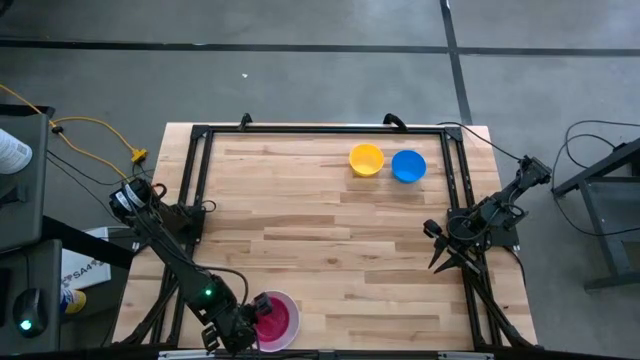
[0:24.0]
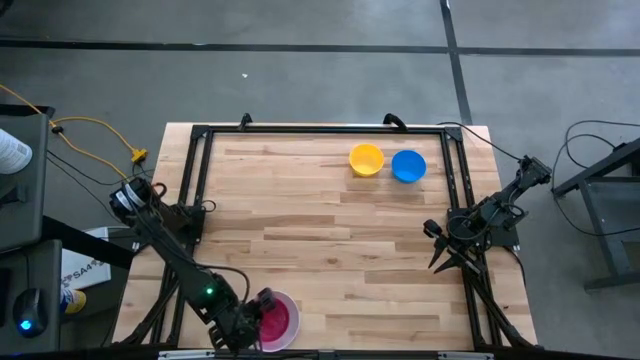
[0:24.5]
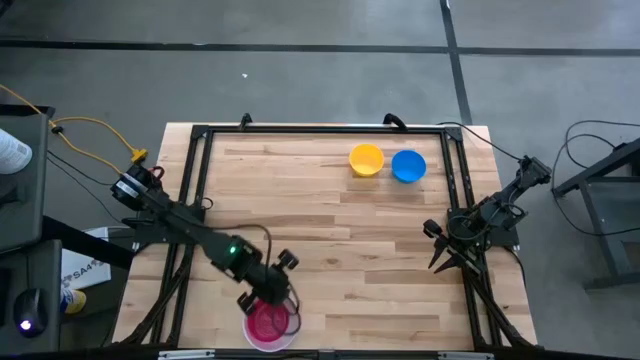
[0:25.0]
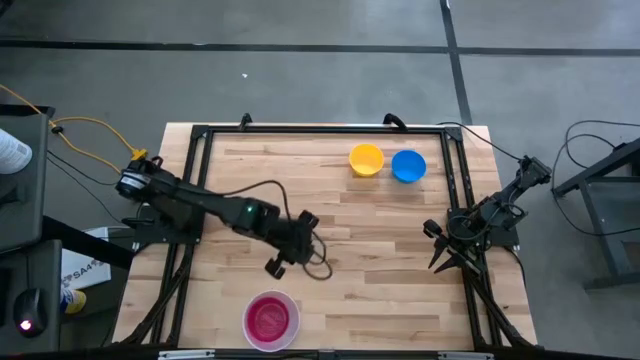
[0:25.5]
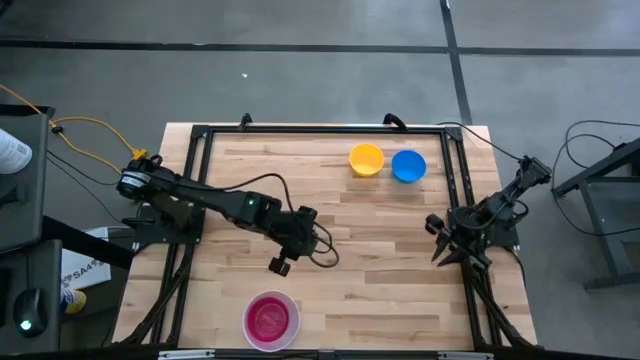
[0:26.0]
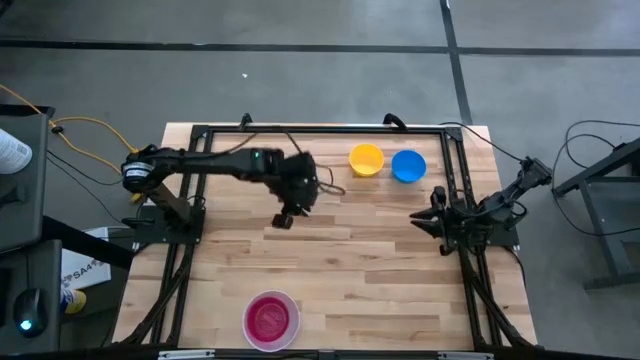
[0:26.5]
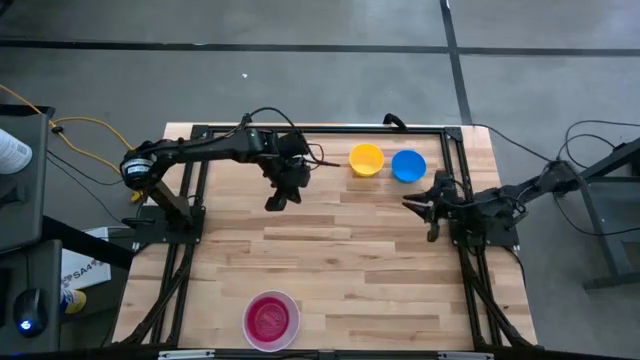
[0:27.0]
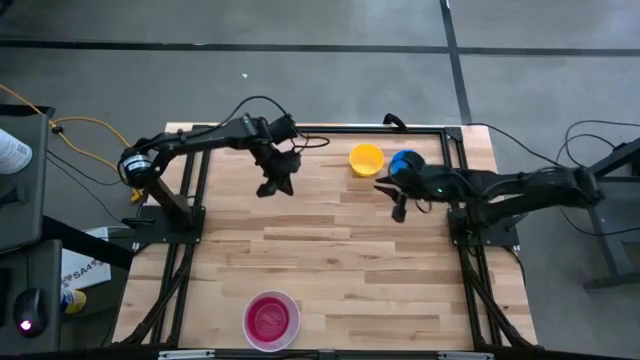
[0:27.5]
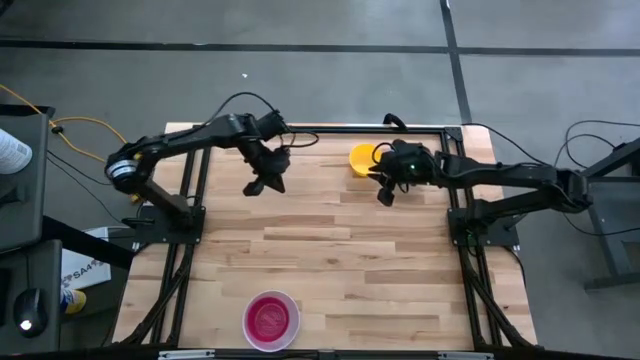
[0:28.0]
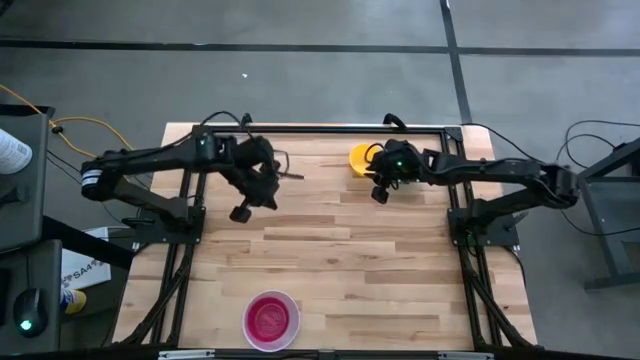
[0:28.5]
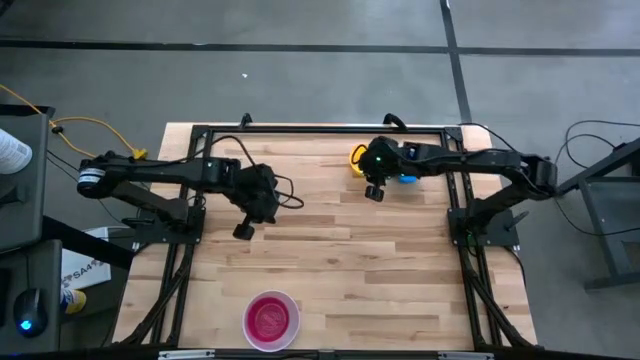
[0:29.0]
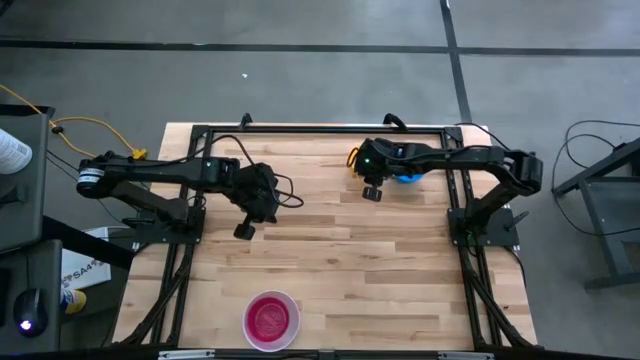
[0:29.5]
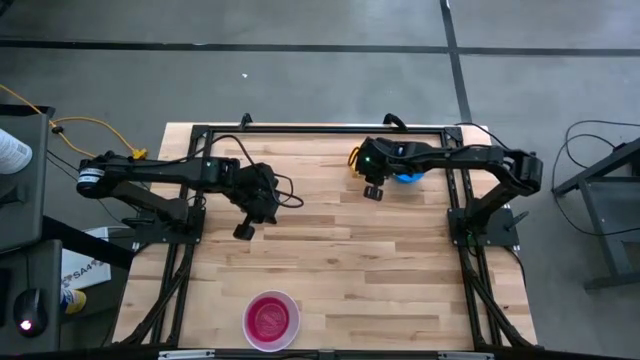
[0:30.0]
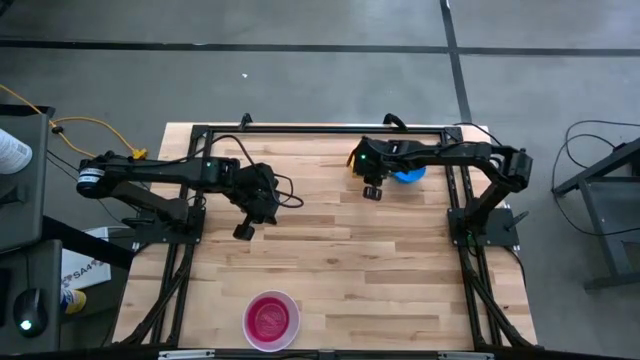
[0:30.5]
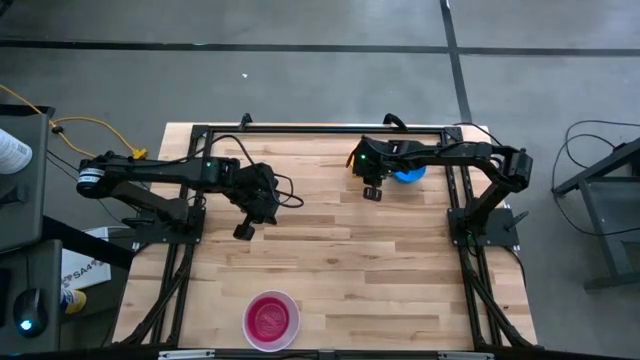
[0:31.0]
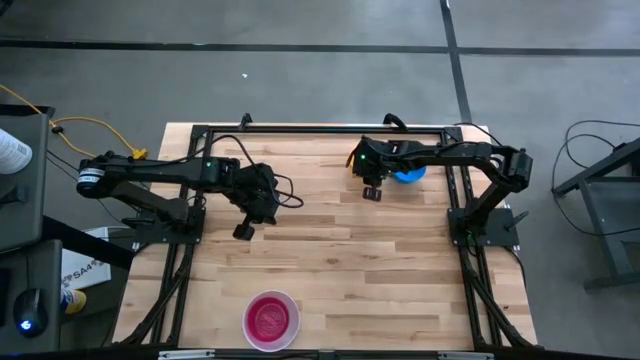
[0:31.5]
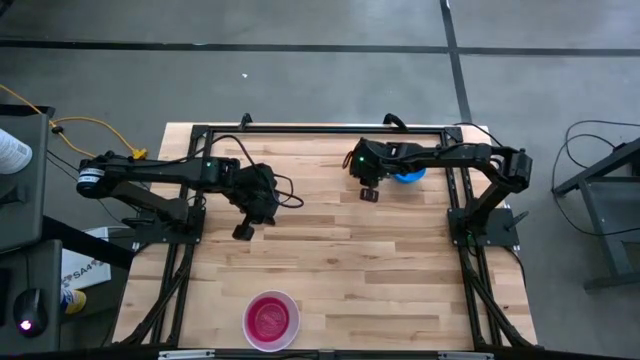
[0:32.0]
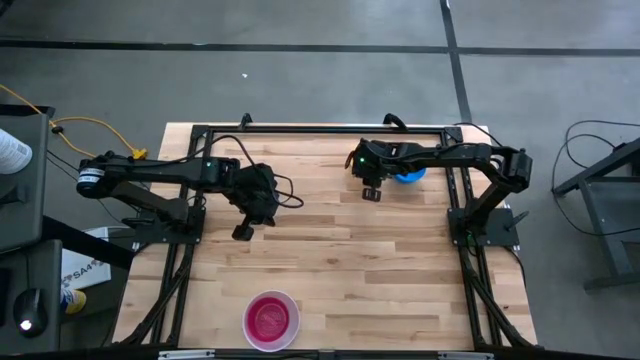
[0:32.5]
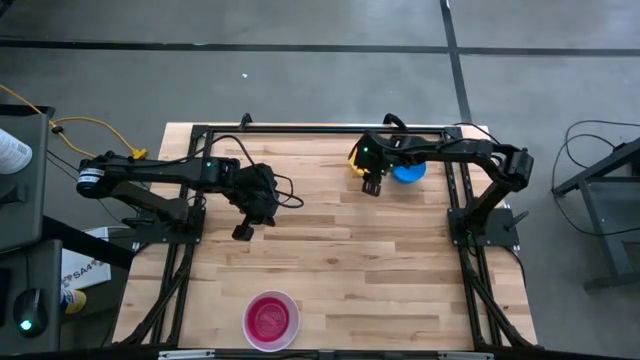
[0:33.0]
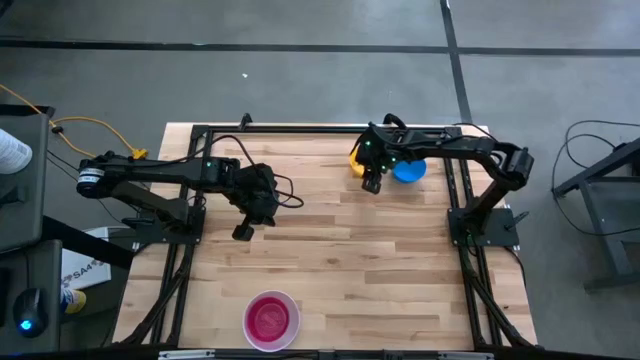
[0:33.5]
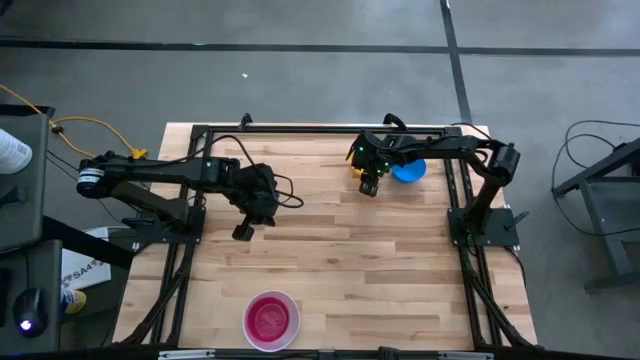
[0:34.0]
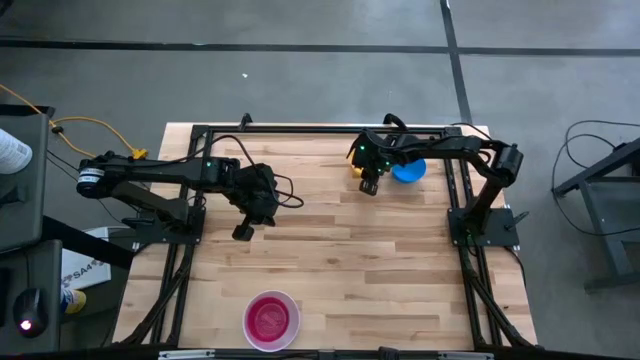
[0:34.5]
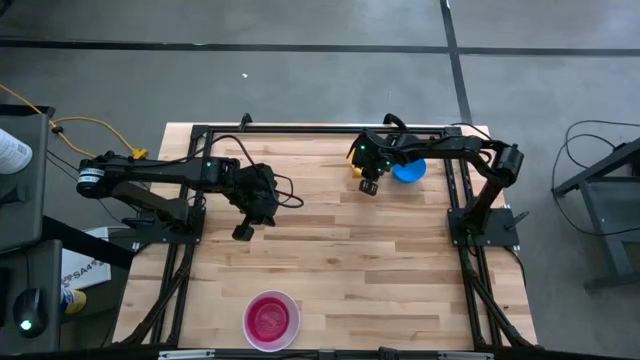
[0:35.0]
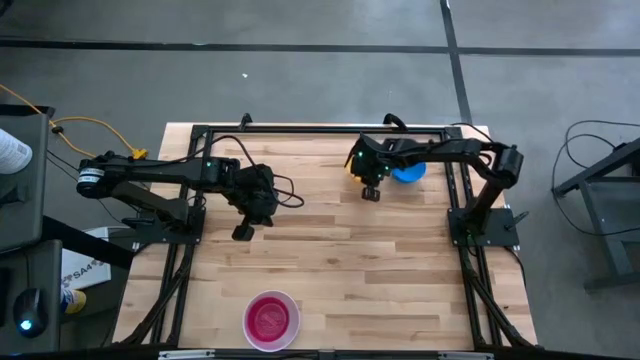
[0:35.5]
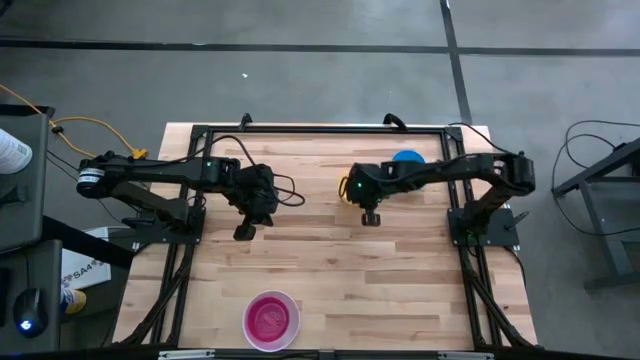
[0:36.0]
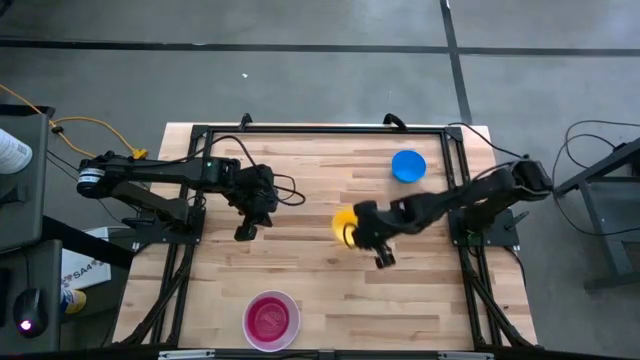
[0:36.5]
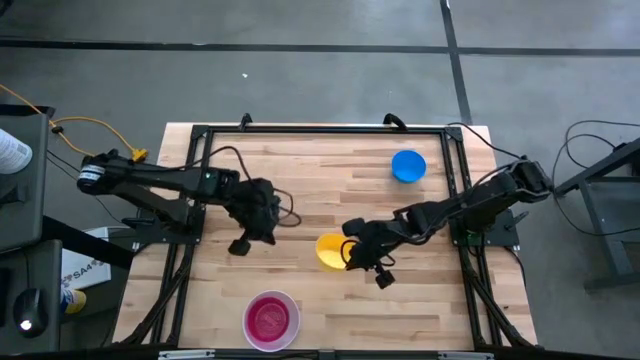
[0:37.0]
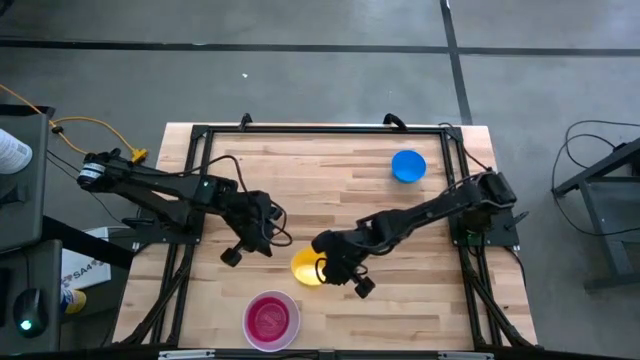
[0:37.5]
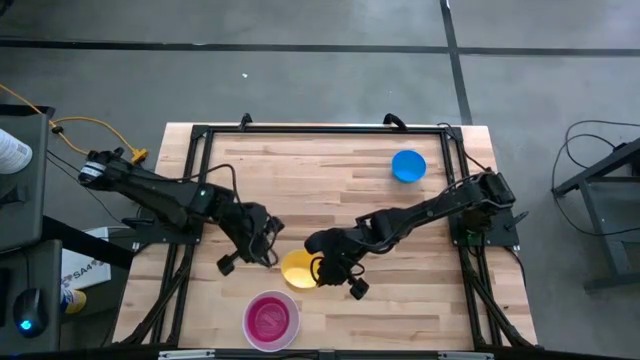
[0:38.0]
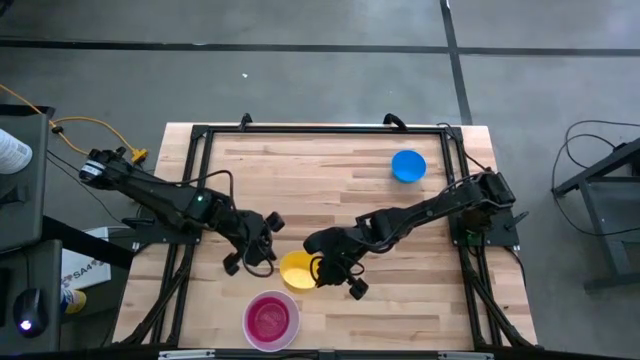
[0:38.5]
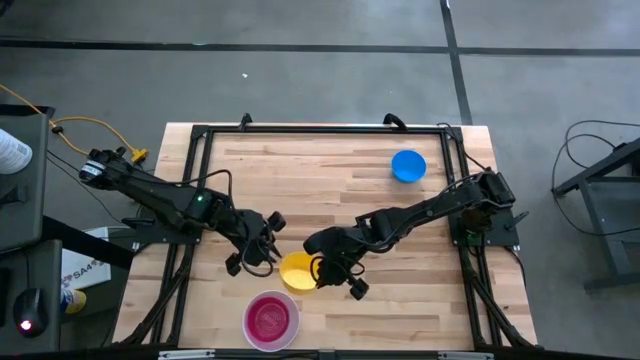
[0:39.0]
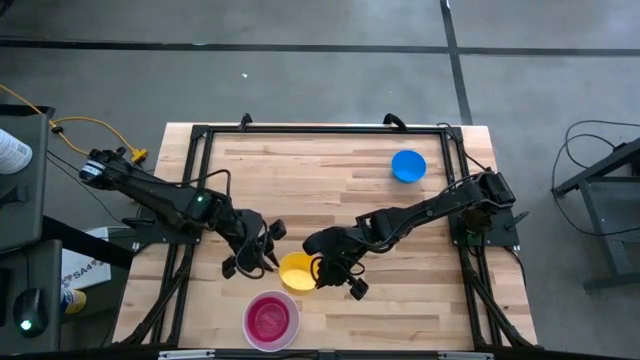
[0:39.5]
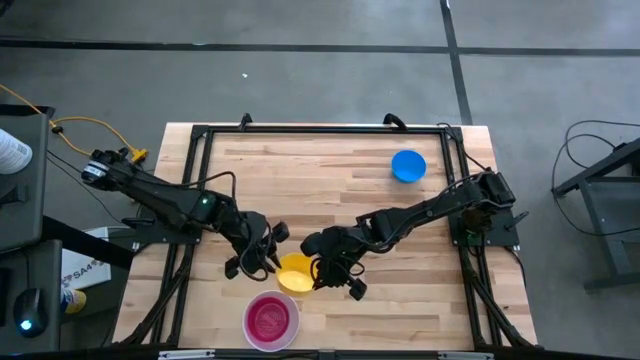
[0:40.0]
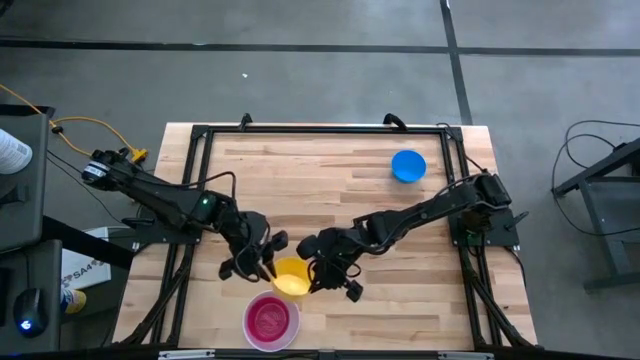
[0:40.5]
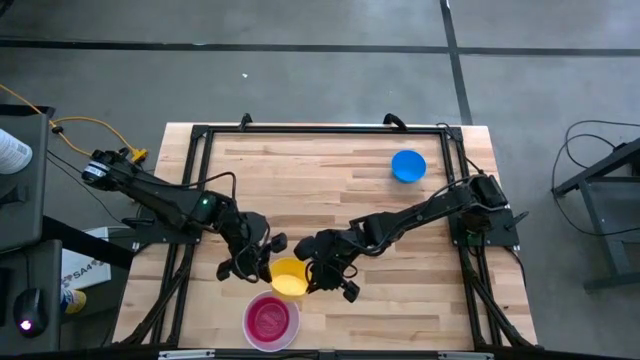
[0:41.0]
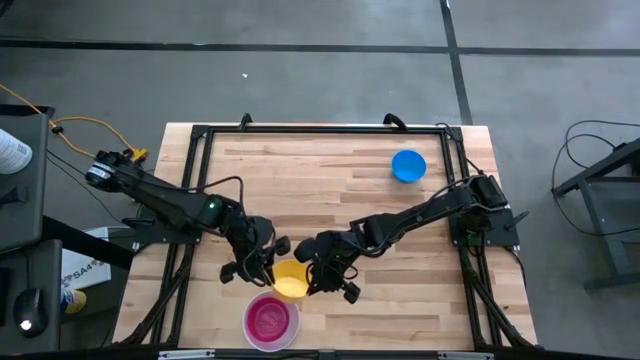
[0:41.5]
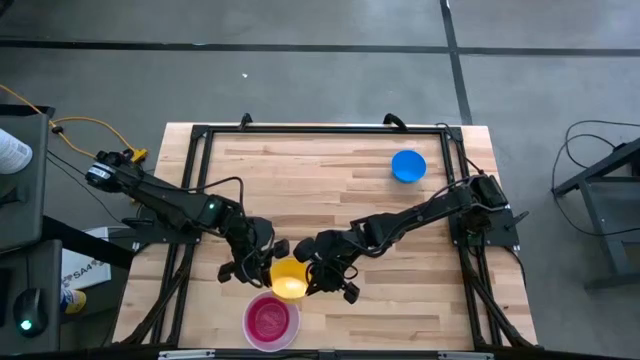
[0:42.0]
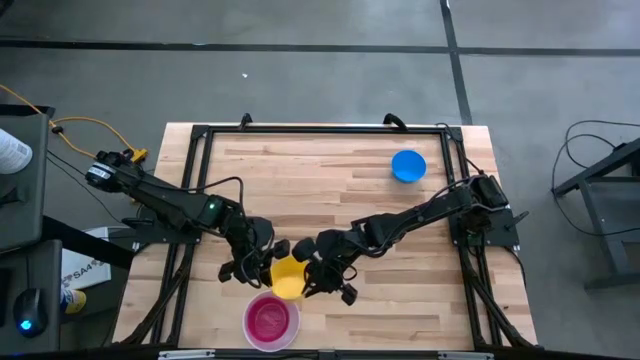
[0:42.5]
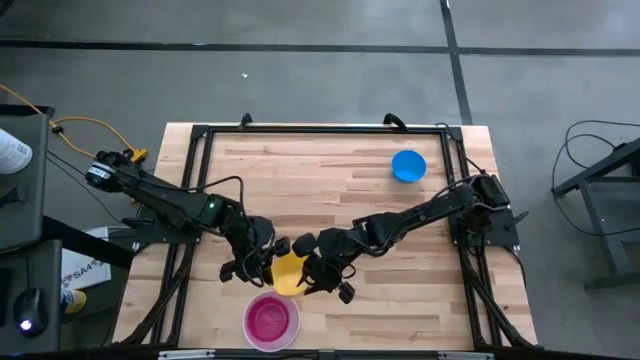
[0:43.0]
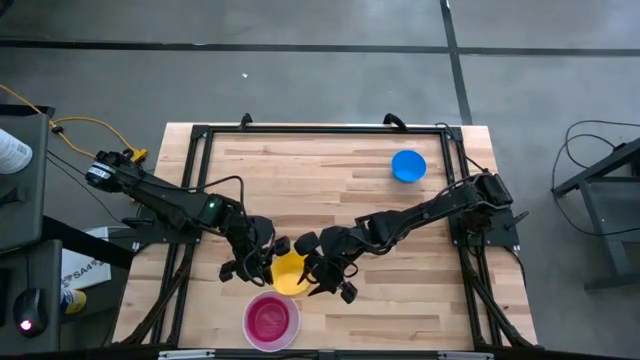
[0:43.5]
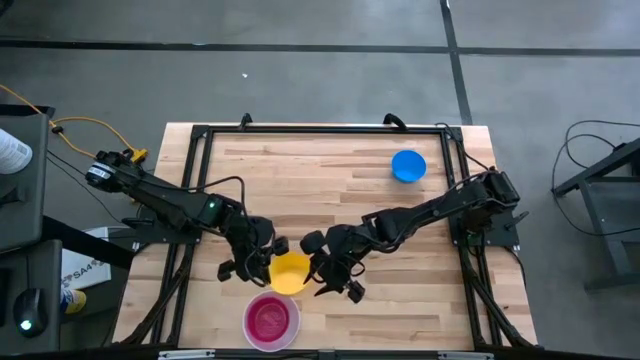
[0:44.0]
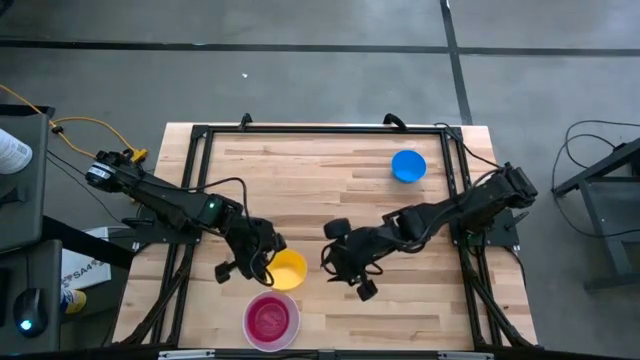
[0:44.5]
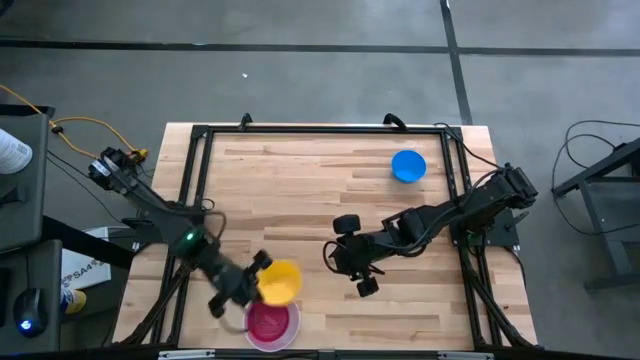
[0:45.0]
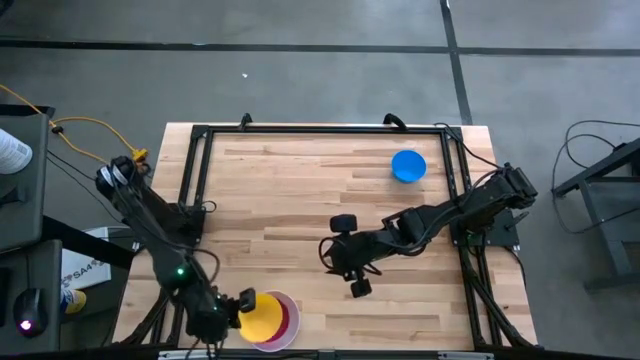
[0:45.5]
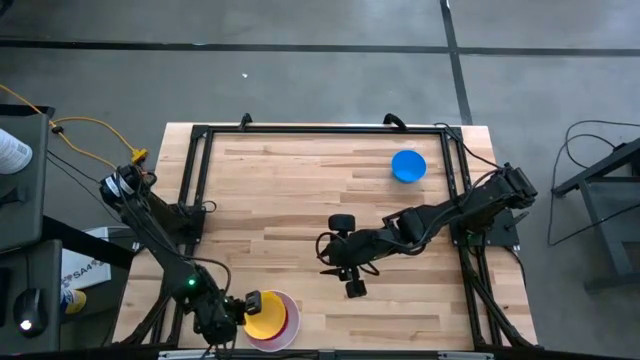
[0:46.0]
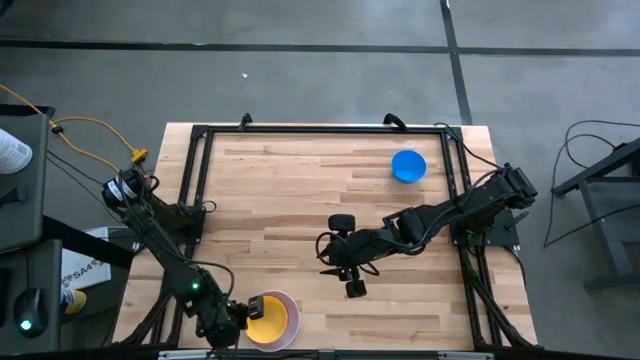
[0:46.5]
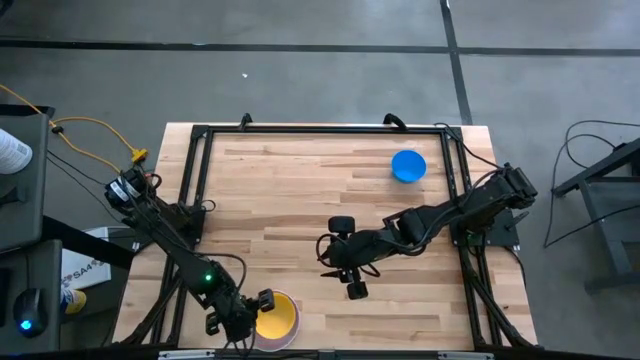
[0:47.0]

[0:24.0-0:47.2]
Stack the yellow bowl on top of the red bowl
